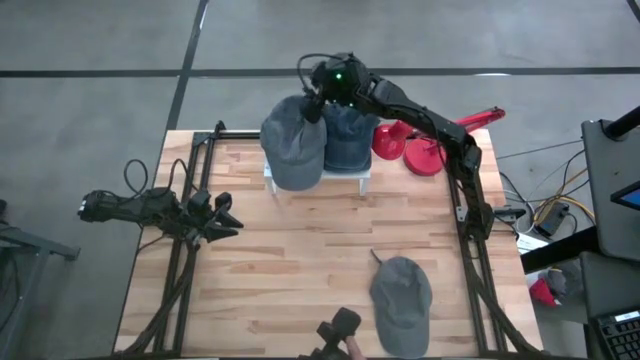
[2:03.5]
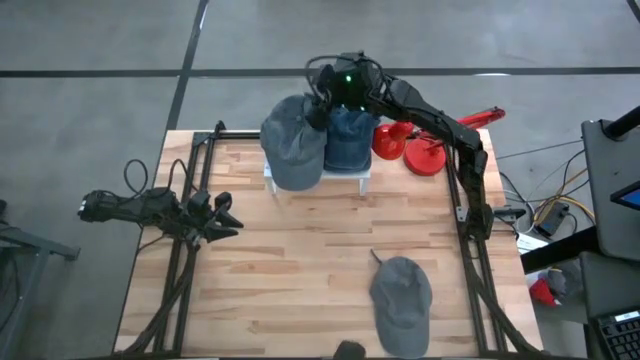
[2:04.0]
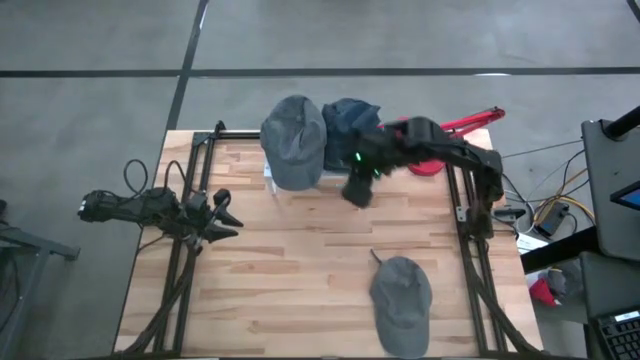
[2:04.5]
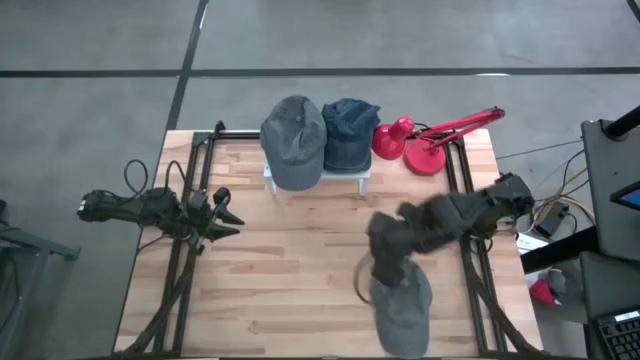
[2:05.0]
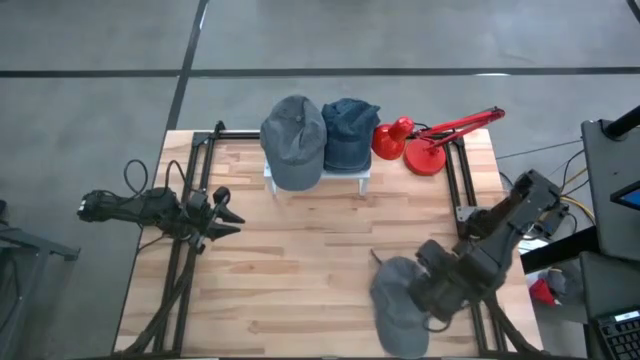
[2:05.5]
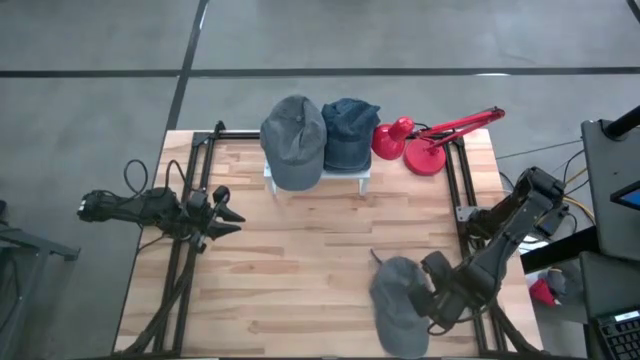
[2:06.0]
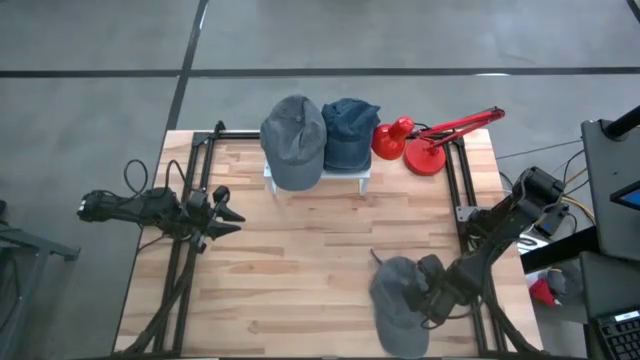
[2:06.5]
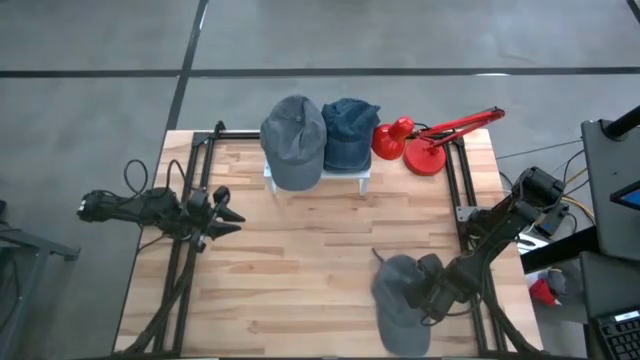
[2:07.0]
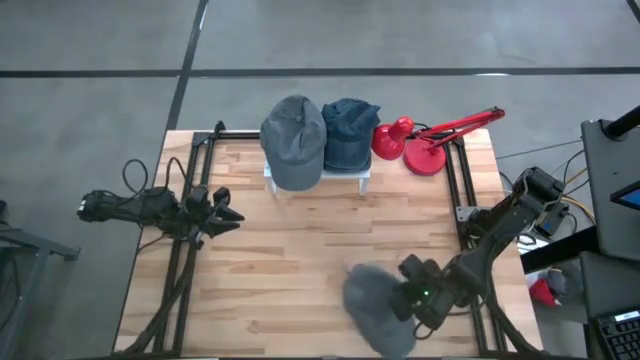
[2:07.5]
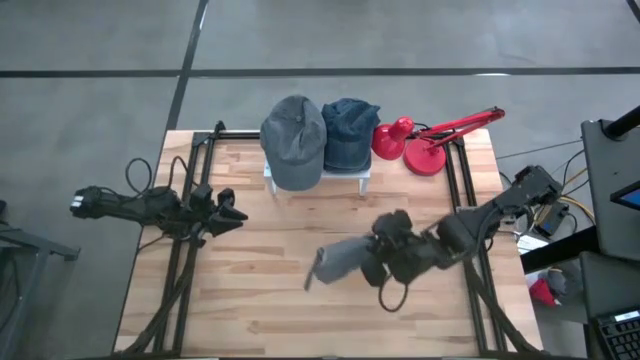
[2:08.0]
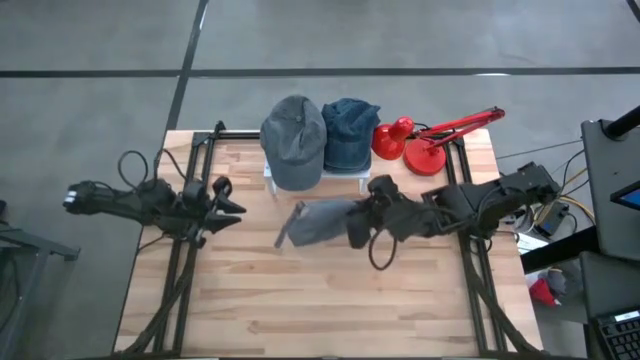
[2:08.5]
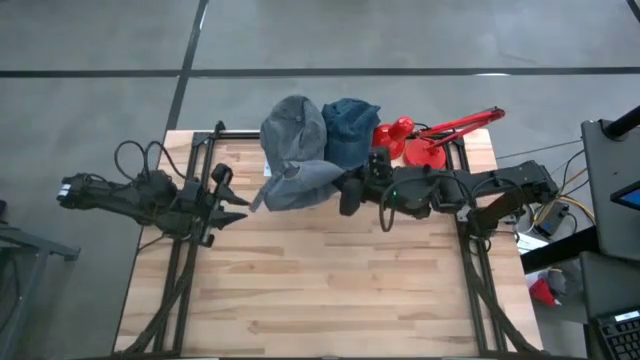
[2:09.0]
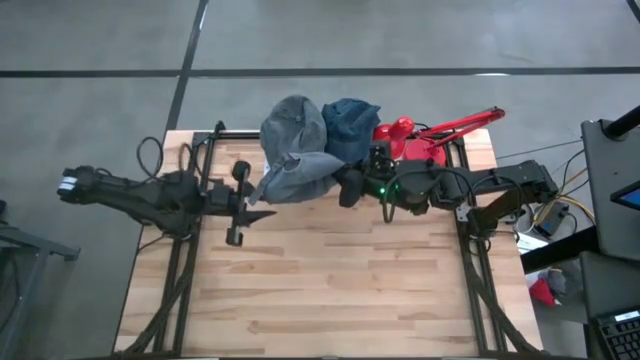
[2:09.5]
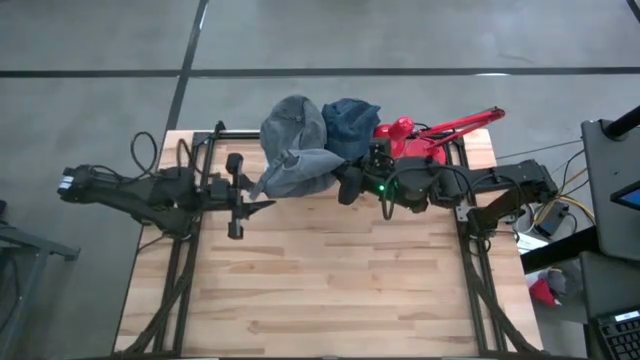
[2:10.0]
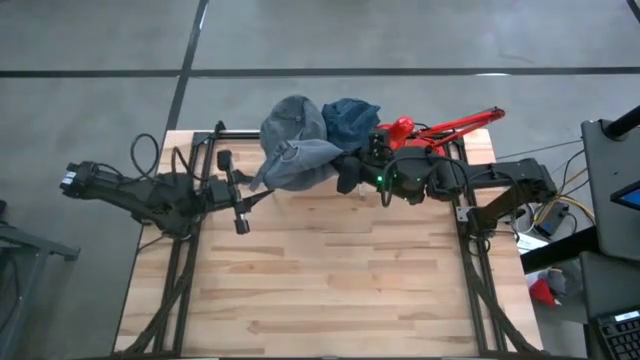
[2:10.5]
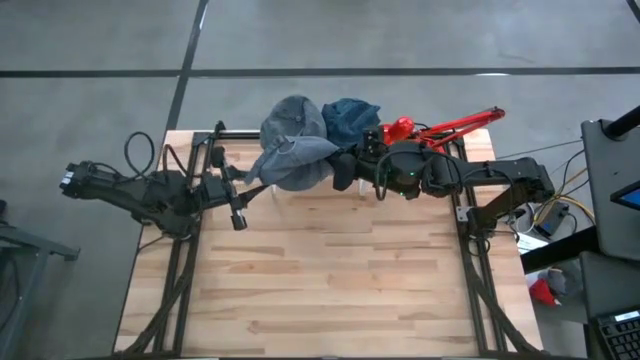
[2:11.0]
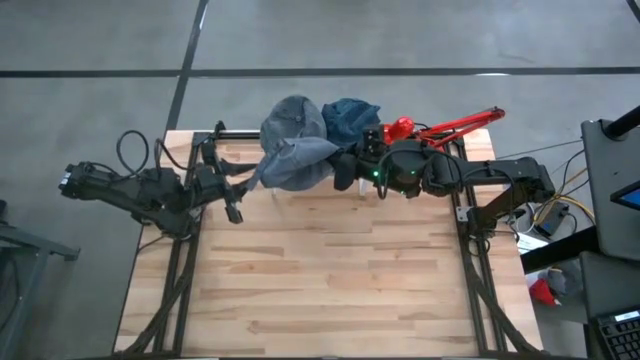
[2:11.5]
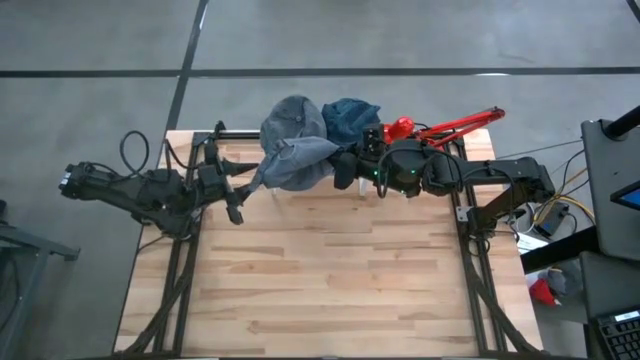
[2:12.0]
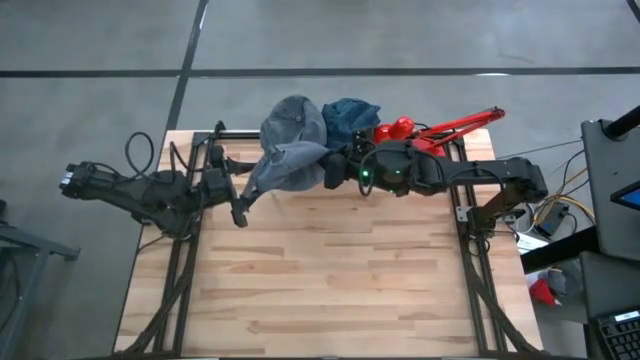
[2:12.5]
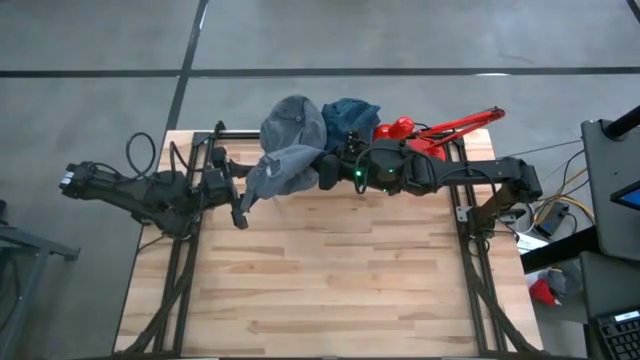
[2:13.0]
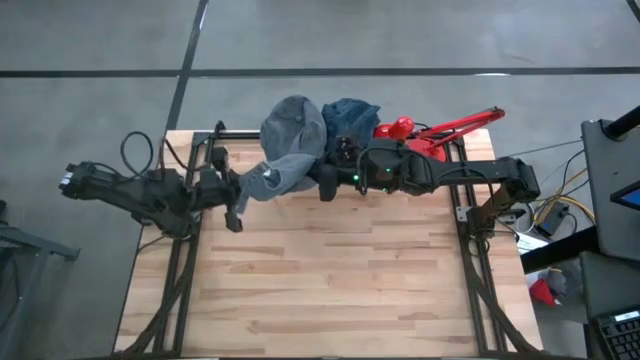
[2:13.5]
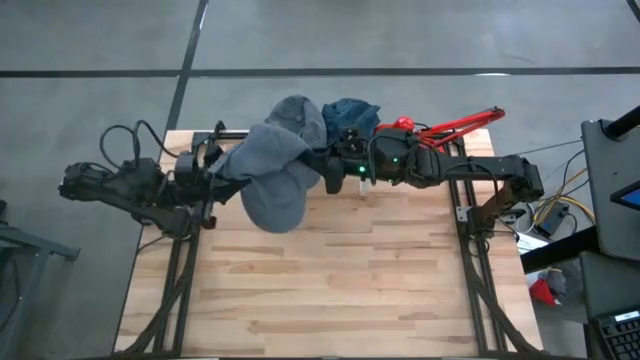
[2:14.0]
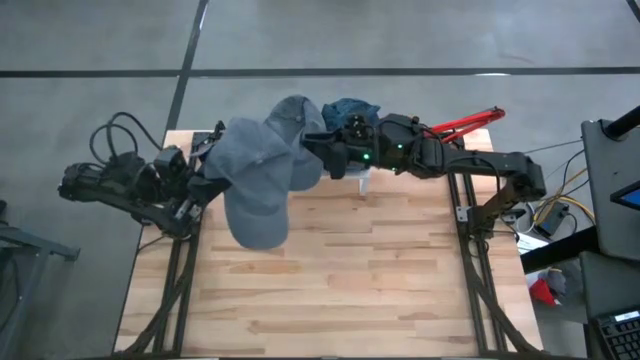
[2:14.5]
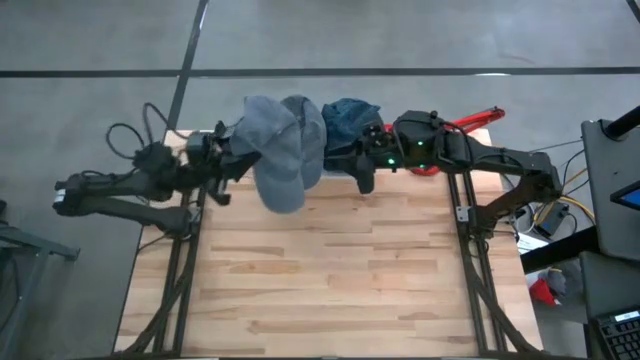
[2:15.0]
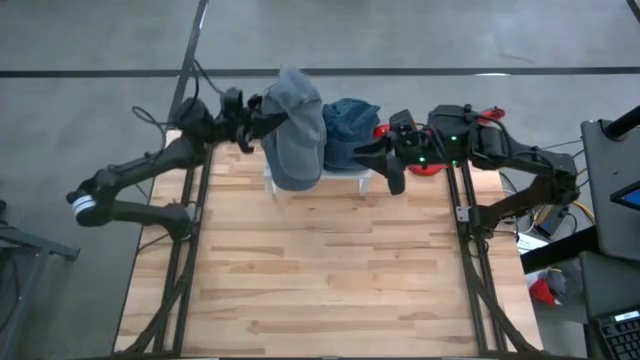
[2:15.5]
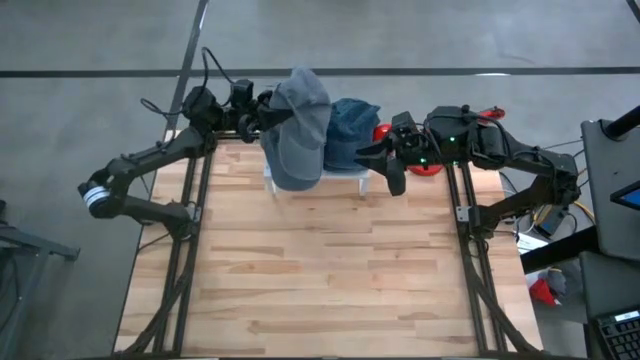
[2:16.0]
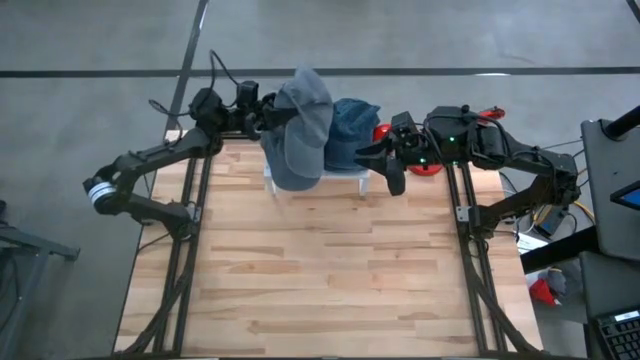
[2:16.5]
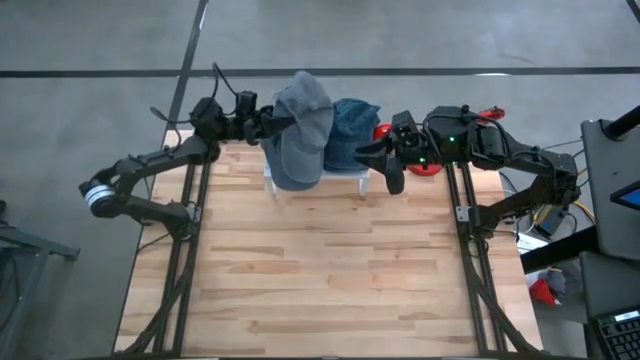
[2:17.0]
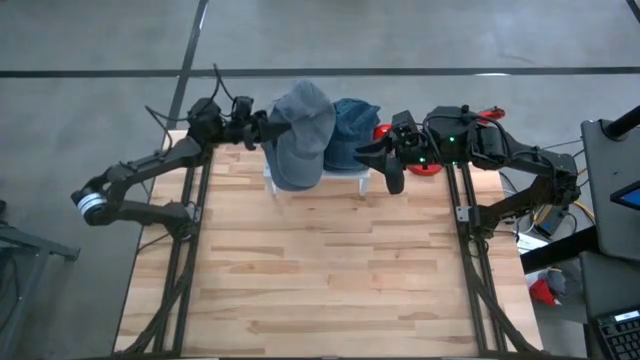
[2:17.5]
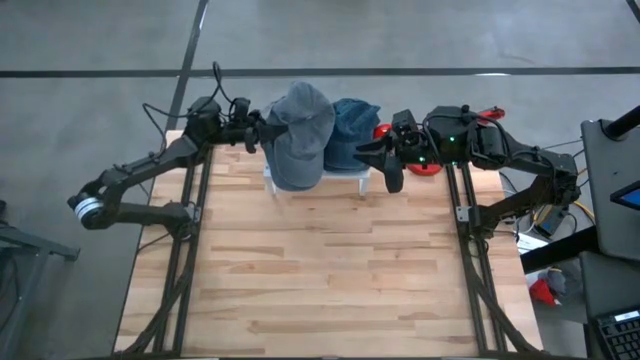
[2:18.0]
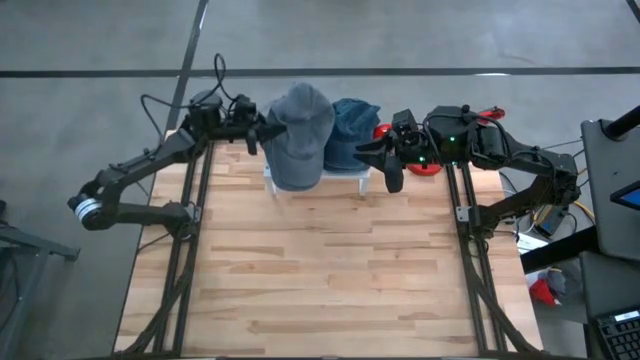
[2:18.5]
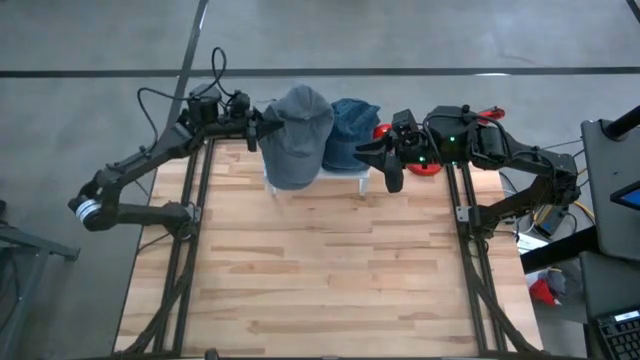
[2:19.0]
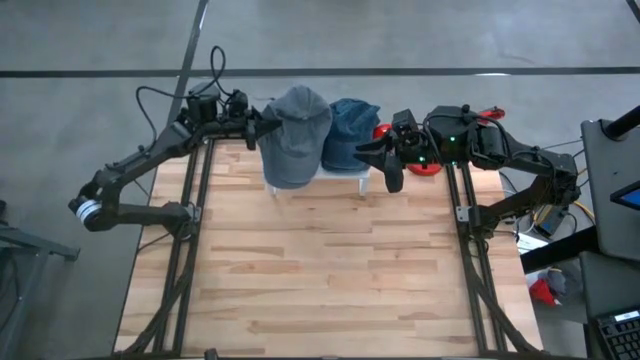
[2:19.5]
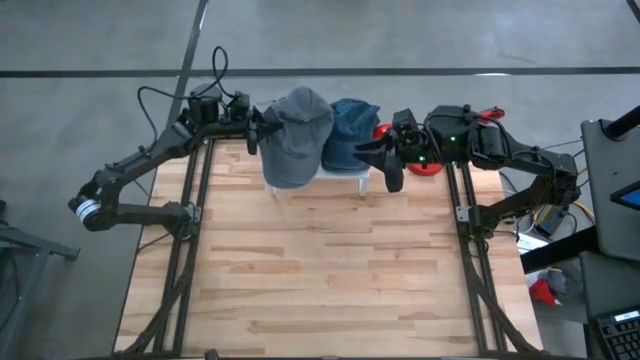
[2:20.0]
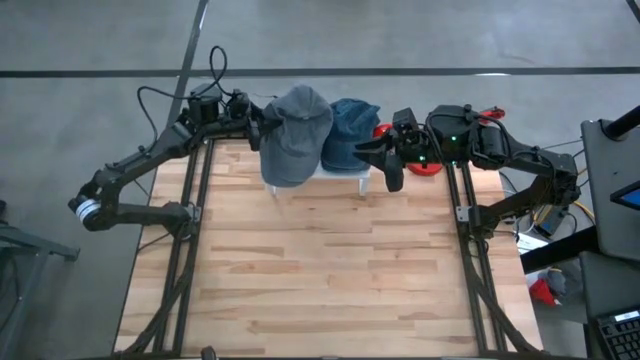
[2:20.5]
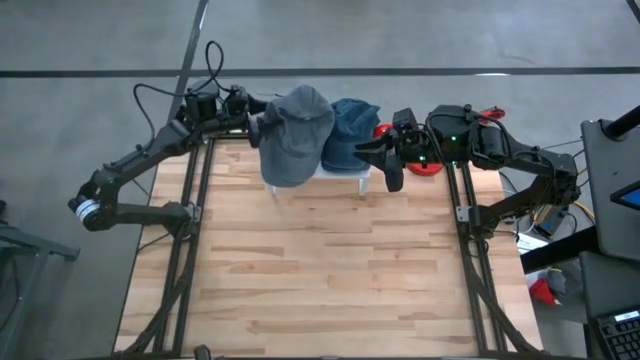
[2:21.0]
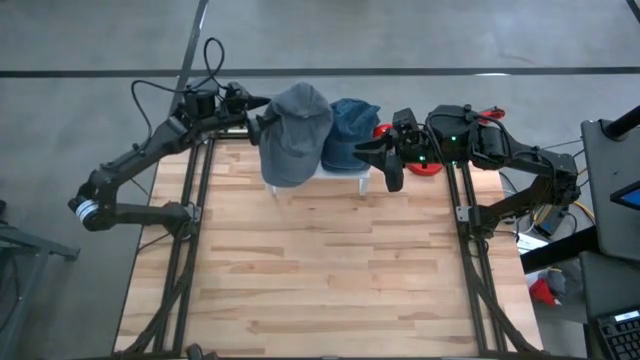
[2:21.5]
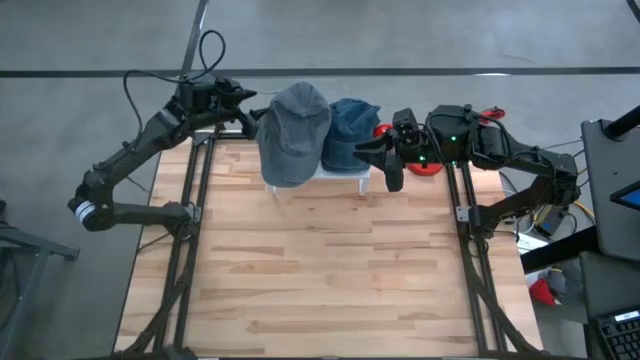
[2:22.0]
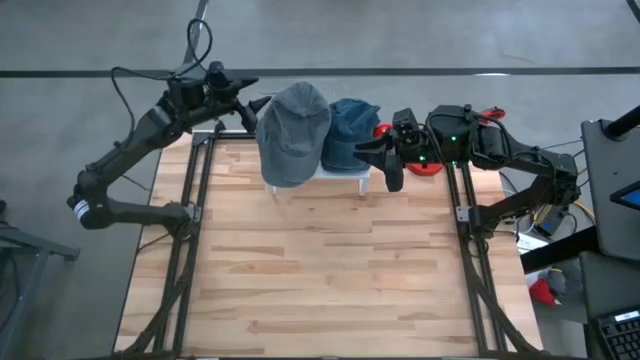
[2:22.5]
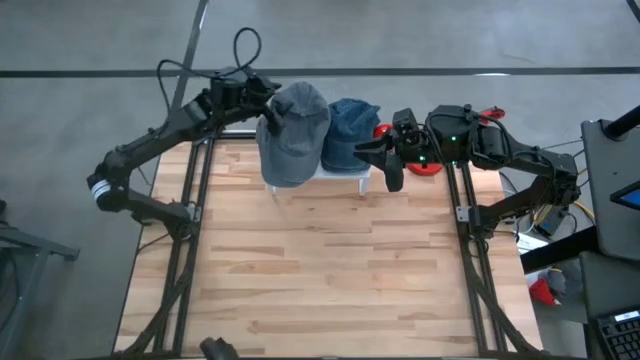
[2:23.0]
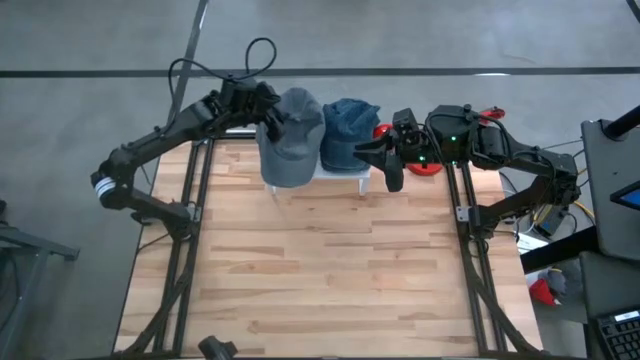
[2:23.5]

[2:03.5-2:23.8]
Task: Pick & Place hat
Stack the gray cap on top of the gray cap on the shelf

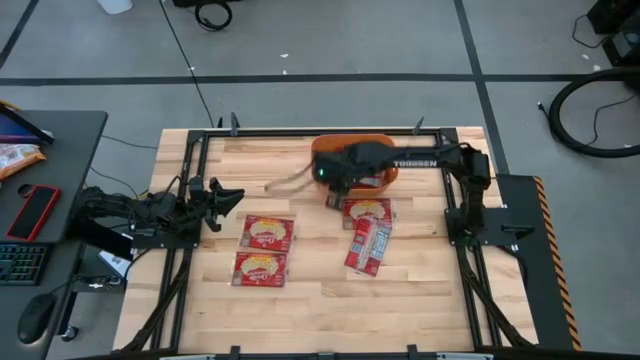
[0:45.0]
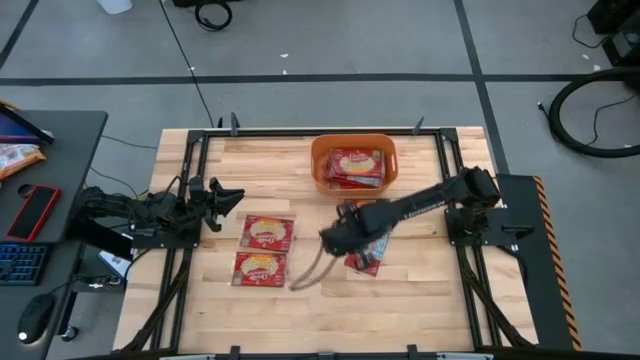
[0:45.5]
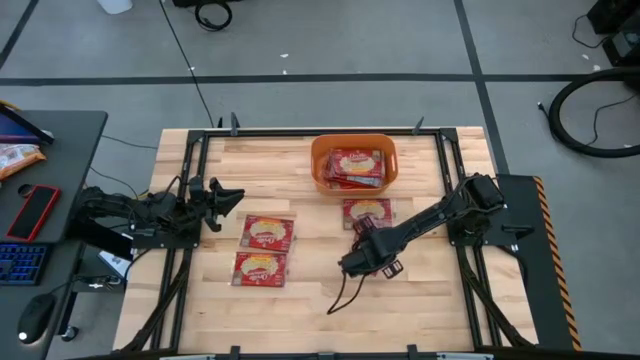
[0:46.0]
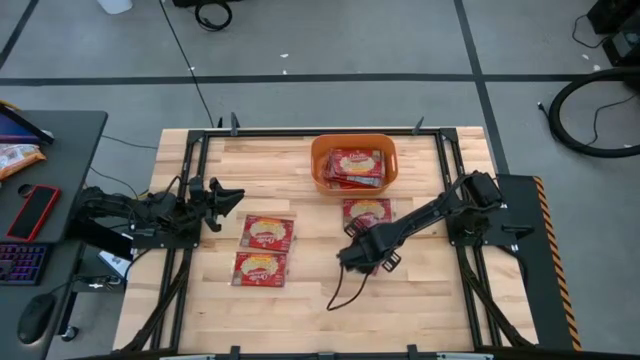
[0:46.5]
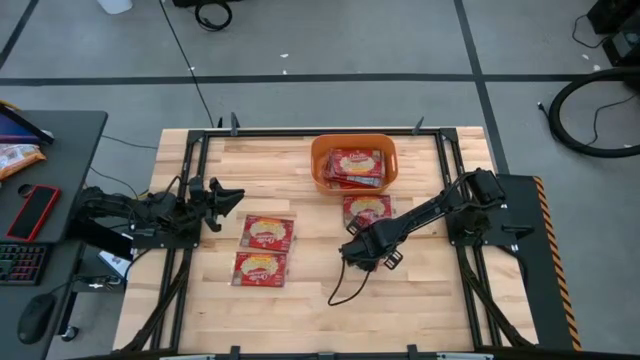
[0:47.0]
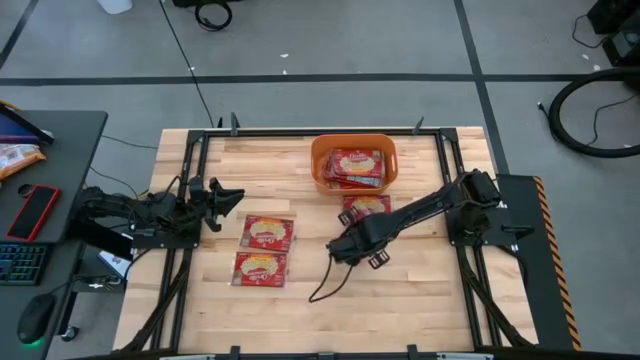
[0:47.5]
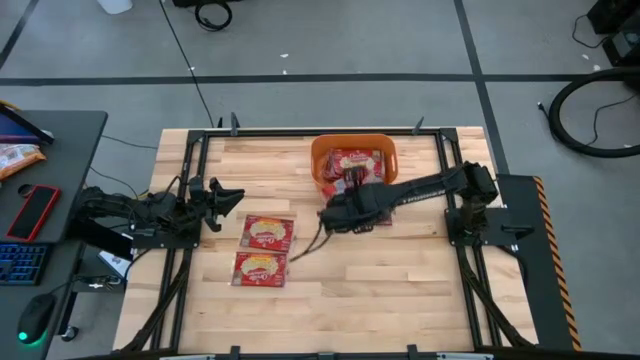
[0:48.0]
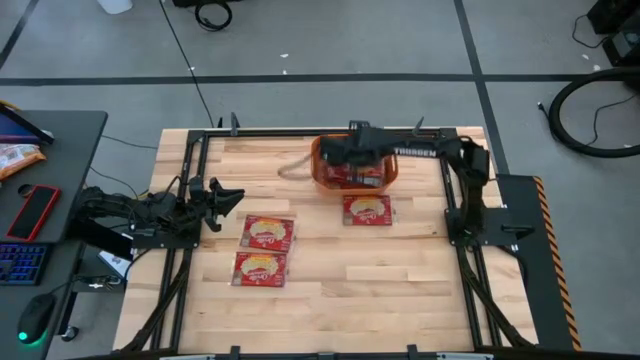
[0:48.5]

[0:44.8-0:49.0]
Task: Sort popcorn bags into baskets
Stack the popcorn bag on top of the other popcorn bag into the orange container
